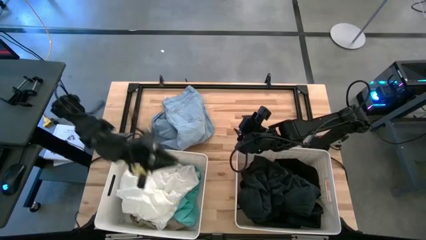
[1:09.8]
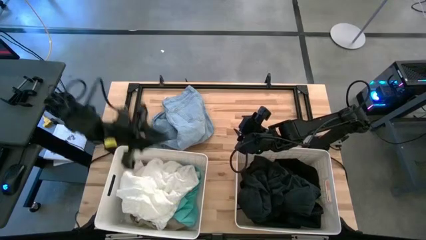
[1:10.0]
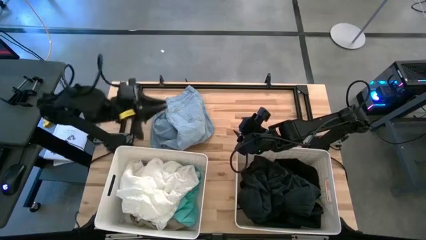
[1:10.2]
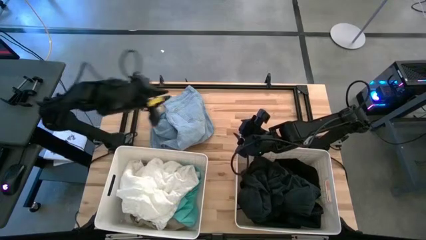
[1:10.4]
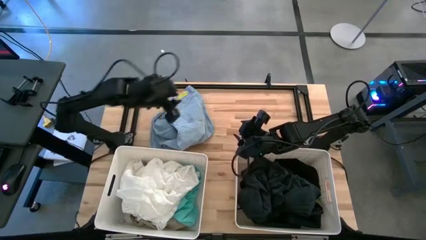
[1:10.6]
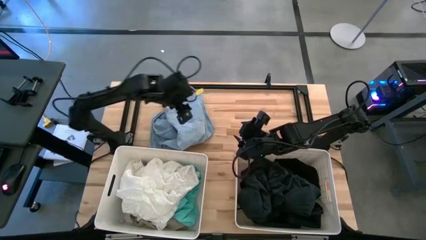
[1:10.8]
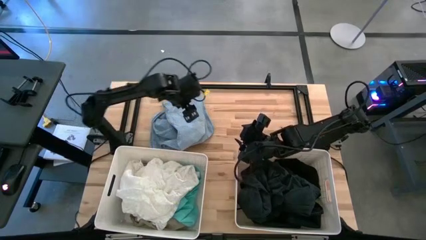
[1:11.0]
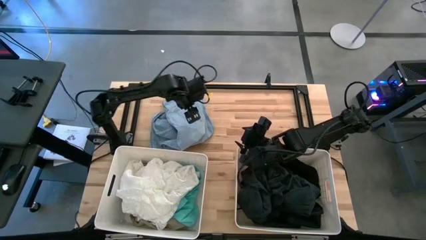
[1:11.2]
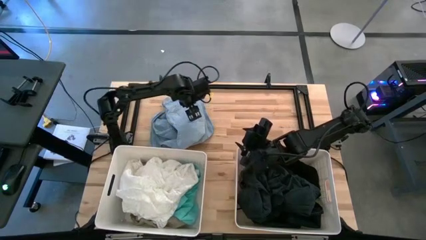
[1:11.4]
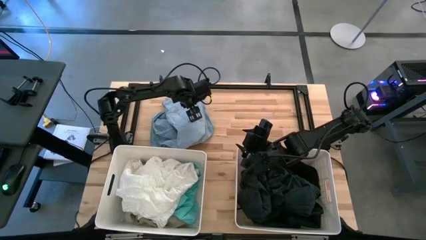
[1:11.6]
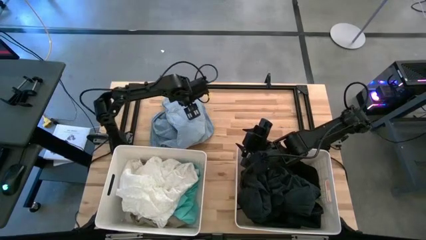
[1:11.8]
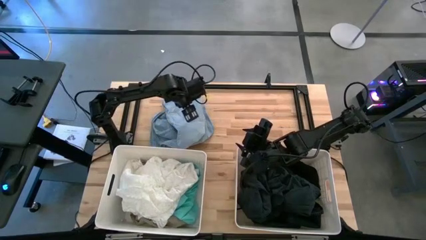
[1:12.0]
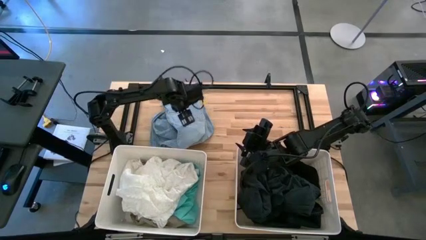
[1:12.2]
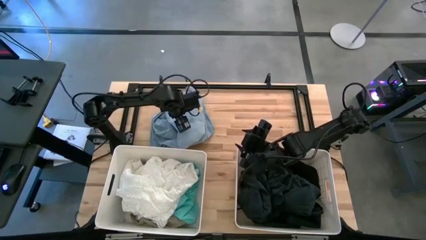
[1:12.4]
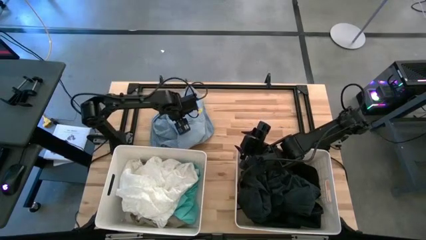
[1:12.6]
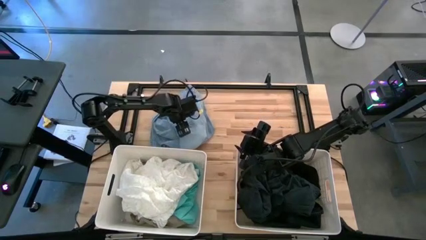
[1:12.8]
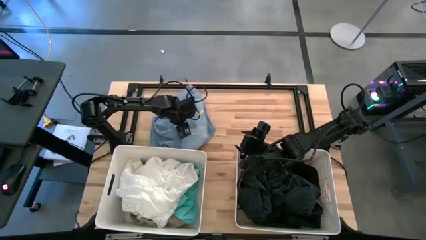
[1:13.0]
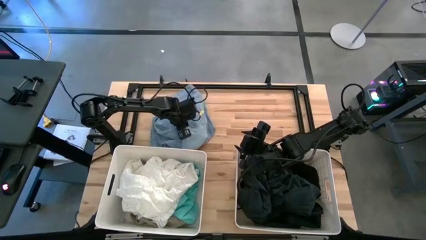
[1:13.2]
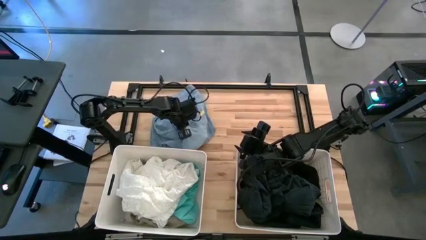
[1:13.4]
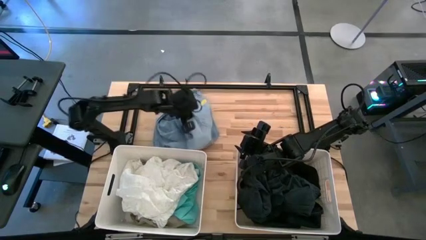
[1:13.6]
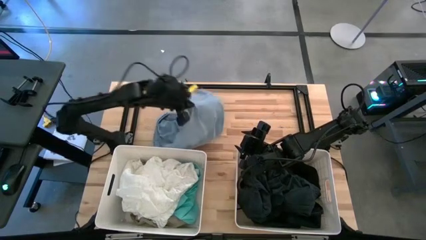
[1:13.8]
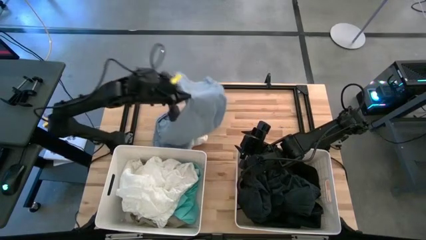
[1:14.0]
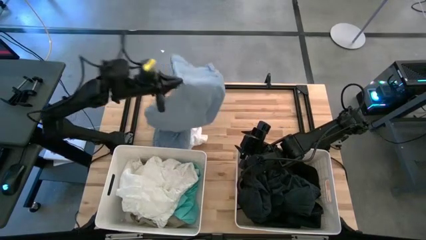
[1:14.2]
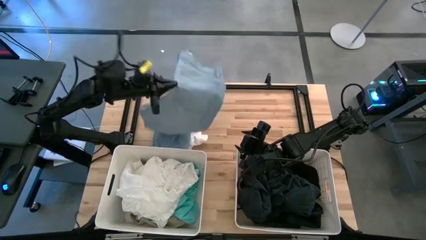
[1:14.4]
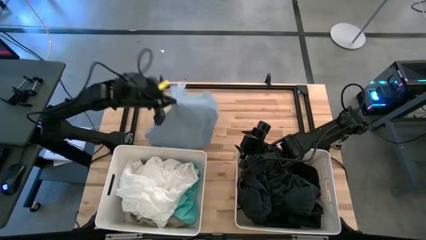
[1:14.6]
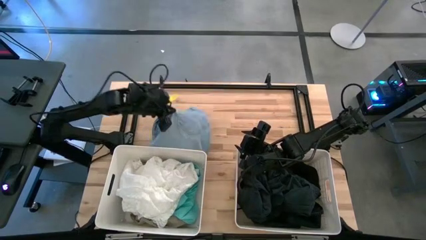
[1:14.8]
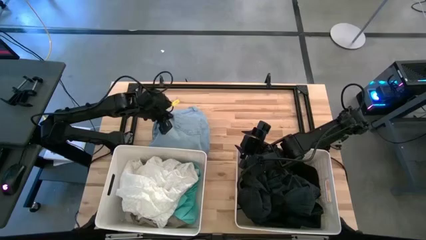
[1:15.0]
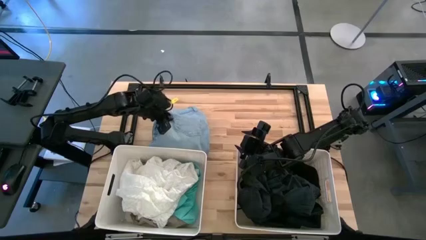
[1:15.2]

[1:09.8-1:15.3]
Task: Sort clothes
Put the blue pants into the left white laundry bin

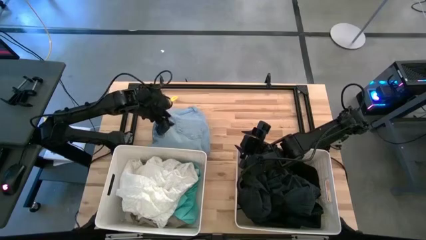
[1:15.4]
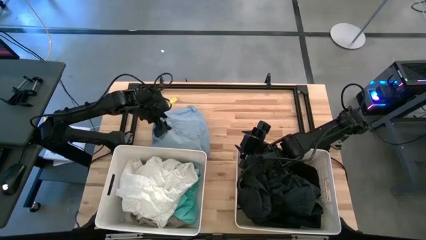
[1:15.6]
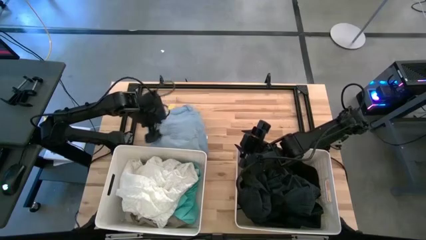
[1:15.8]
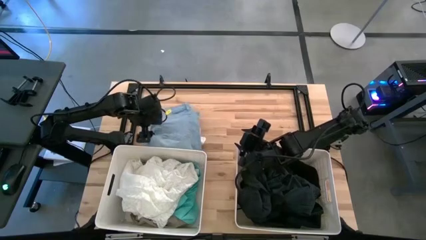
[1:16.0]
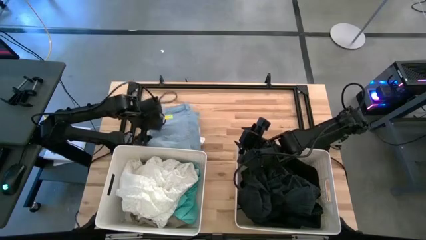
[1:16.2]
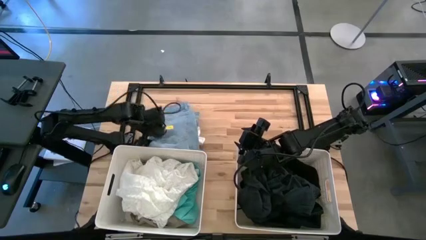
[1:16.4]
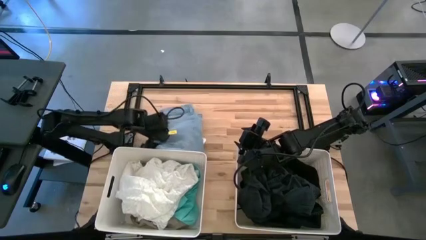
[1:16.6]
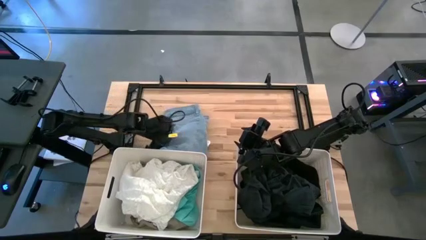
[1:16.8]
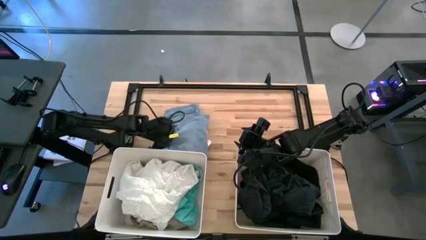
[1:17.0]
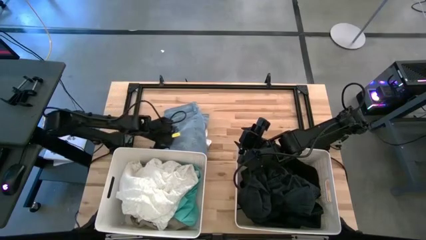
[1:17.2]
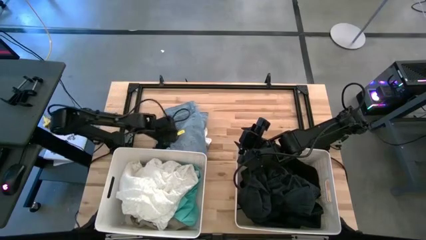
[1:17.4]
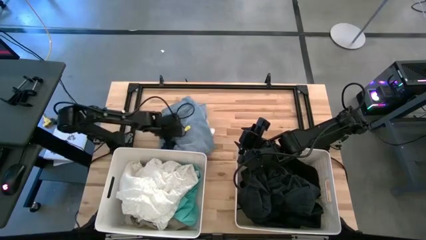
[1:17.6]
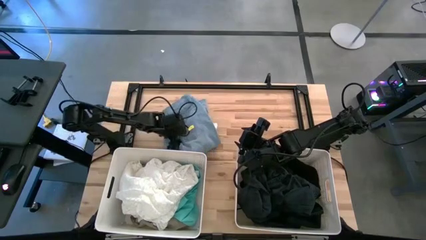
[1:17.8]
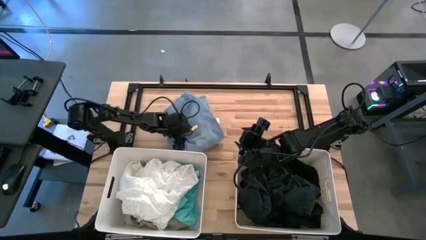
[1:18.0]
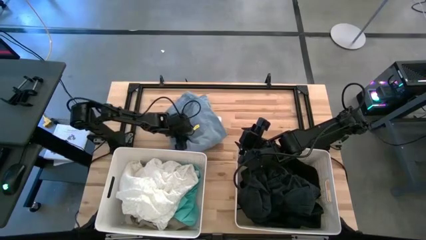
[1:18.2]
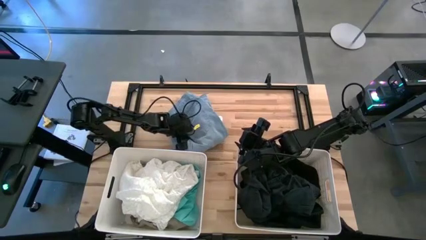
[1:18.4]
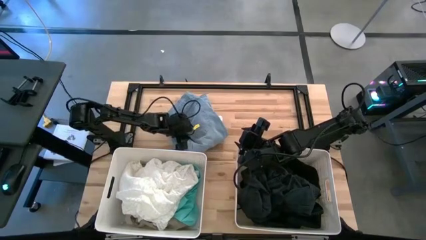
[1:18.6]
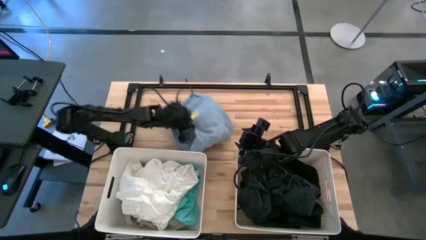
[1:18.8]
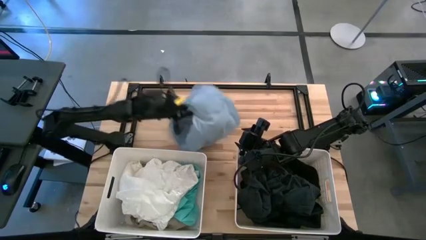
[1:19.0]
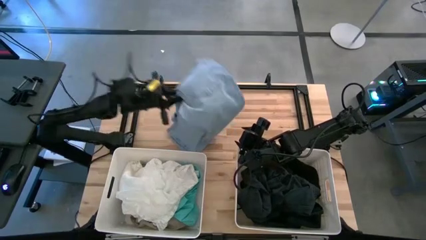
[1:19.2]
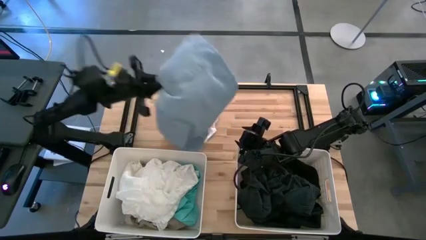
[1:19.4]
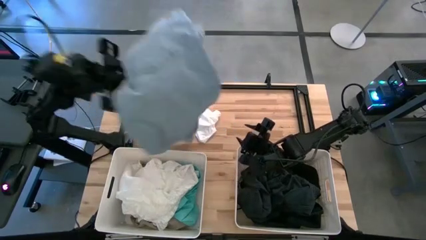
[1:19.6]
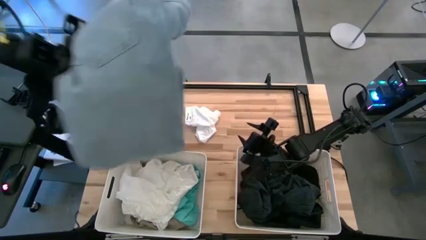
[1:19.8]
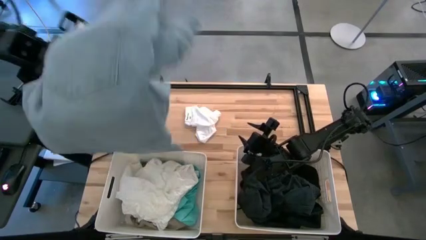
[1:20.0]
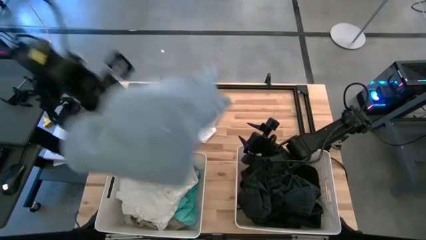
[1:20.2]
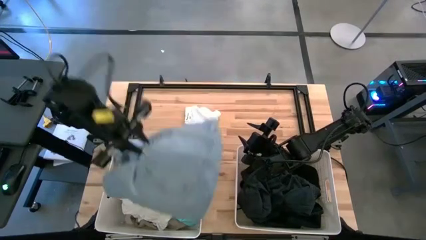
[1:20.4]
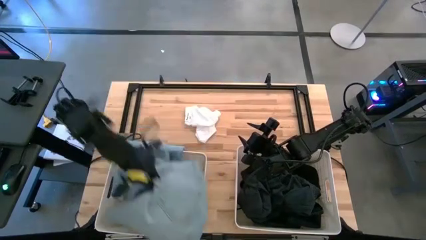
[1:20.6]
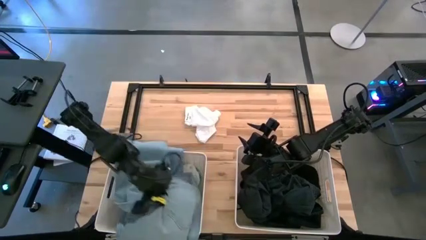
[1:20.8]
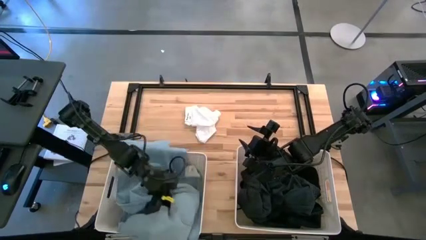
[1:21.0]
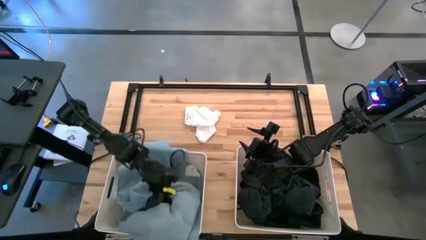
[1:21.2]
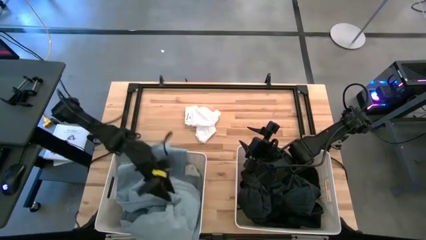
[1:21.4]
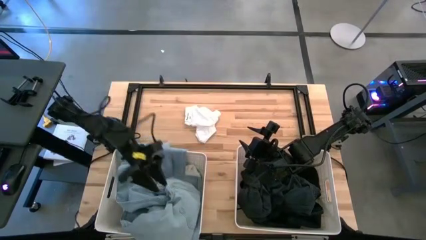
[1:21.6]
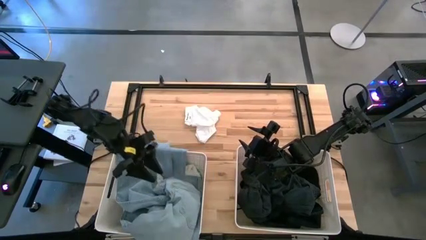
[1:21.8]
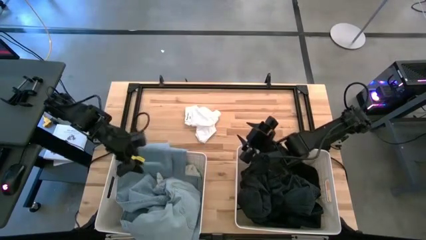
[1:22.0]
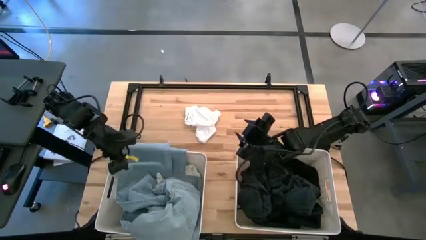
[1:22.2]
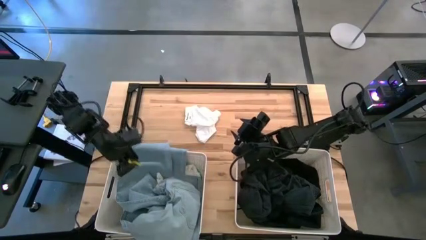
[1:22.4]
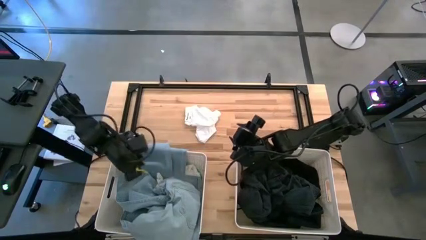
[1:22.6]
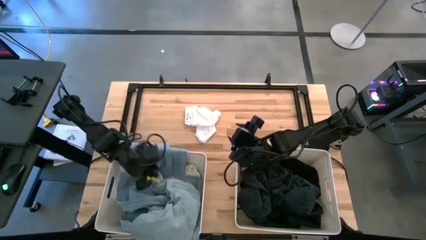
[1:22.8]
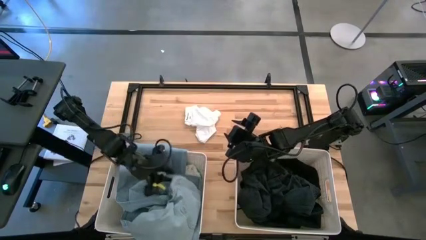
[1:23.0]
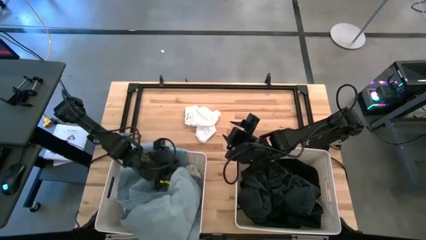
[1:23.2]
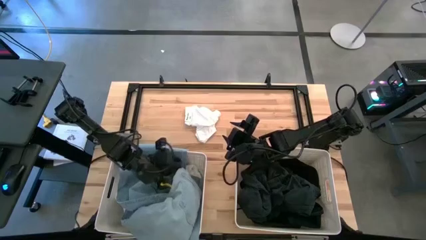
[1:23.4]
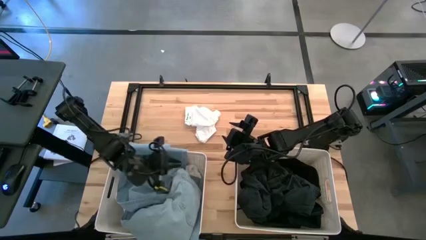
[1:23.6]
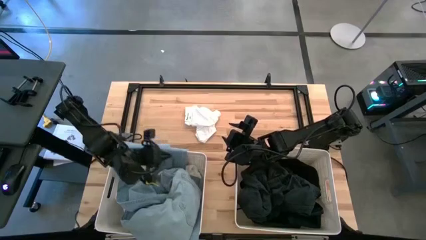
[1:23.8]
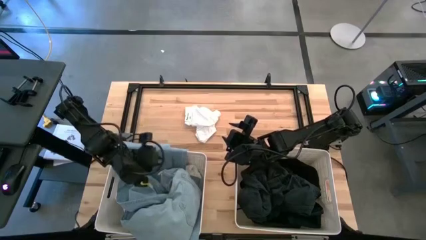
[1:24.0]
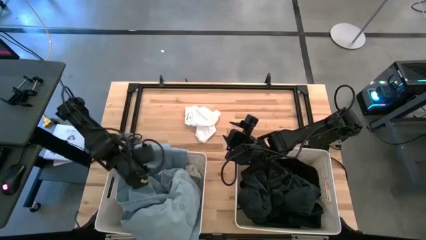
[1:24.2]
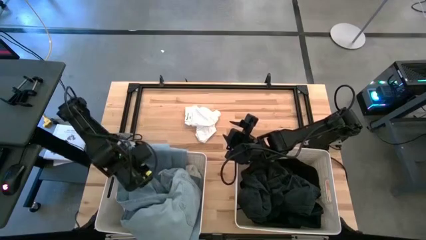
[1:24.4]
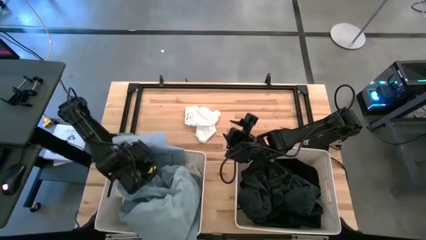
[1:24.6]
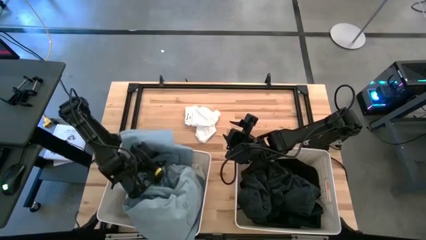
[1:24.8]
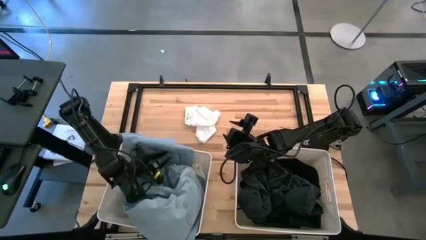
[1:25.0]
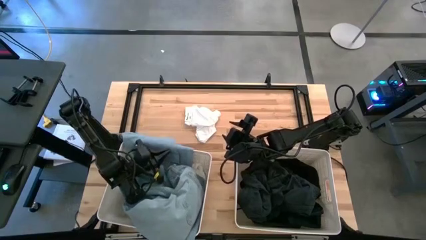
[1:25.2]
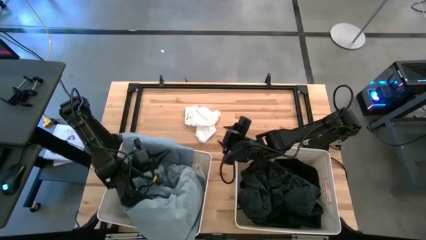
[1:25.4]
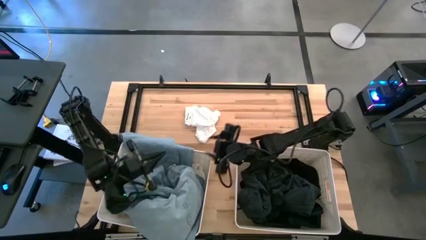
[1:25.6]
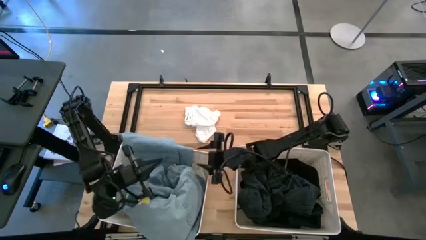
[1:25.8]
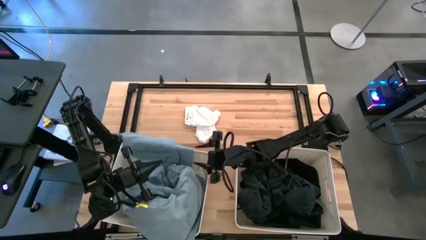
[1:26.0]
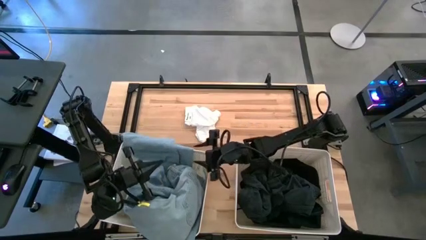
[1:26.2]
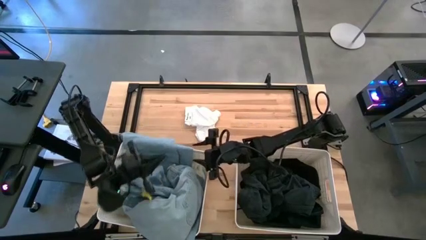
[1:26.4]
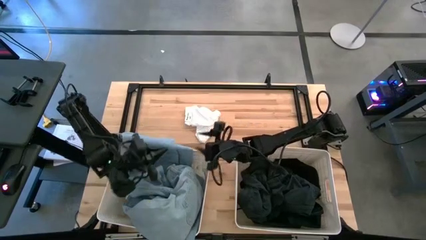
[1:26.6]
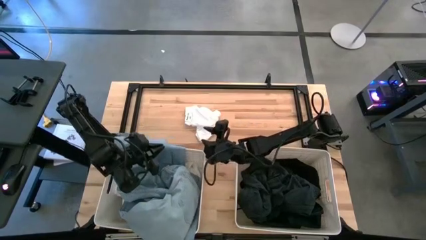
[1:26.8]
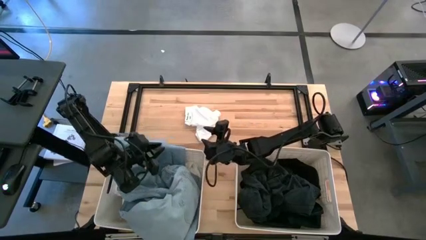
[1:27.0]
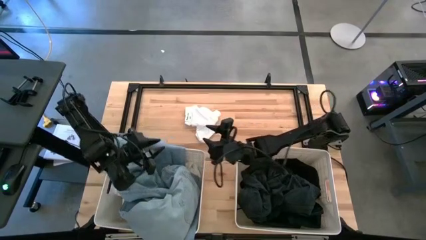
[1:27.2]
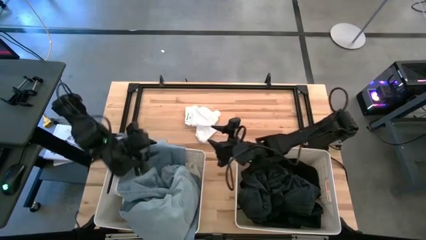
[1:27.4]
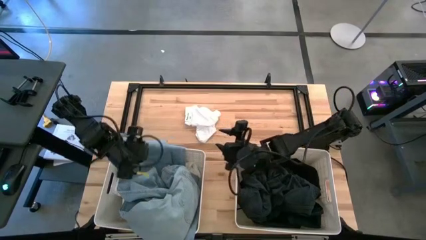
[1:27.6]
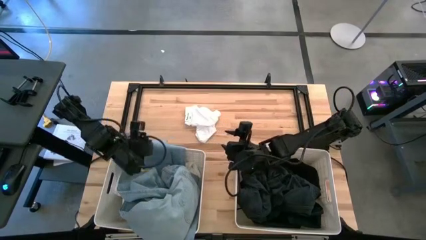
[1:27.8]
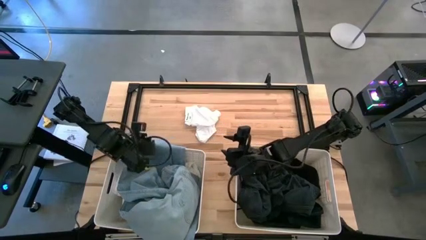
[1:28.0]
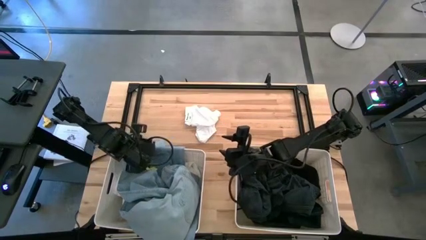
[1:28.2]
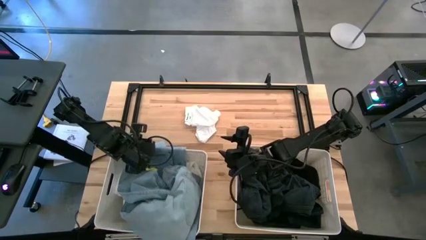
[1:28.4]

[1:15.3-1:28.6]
Put the blue pants into the left white laundry bin
